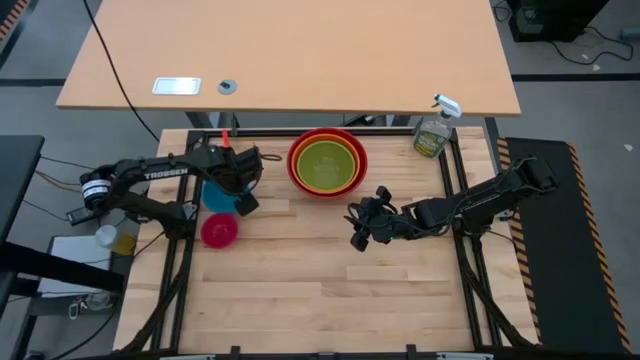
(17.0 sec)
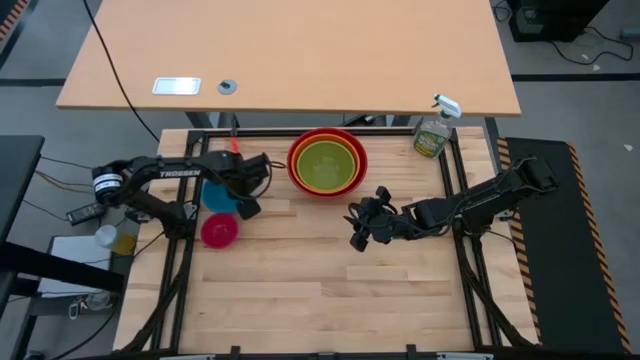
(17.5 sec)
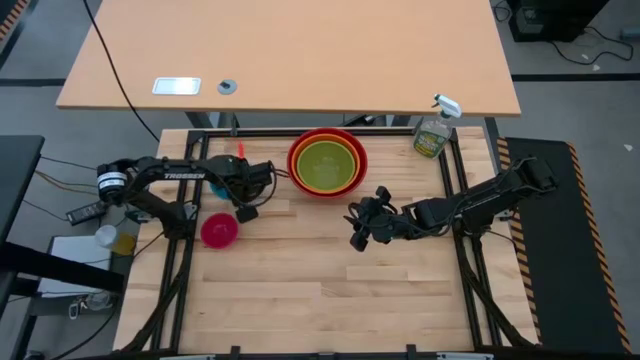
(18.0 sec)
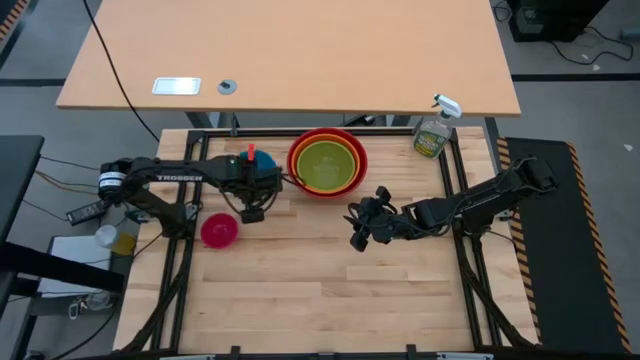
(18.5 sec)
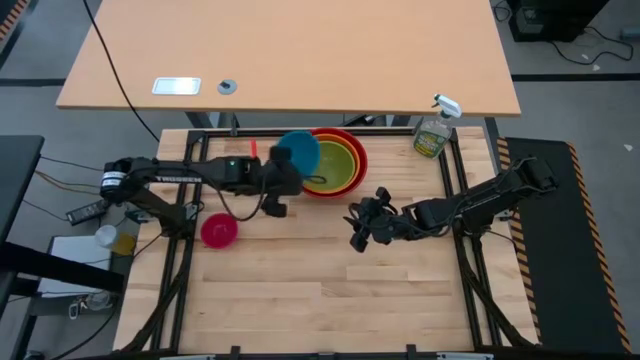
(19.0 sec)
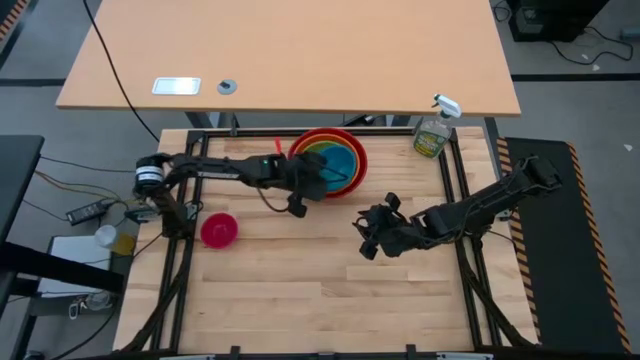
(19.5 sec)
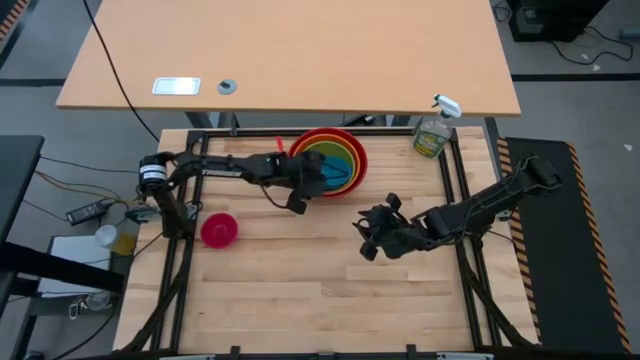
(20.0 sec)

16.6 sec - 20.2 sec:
Stack the blue bowl on top of the green bowl

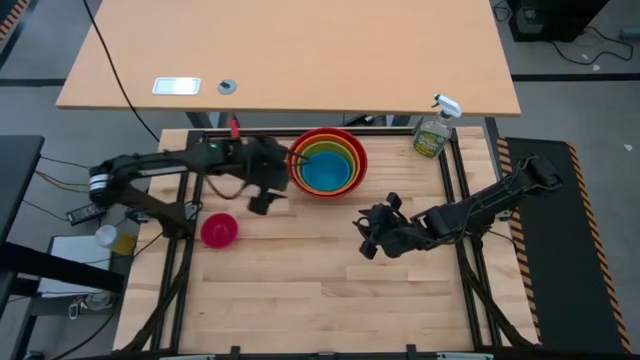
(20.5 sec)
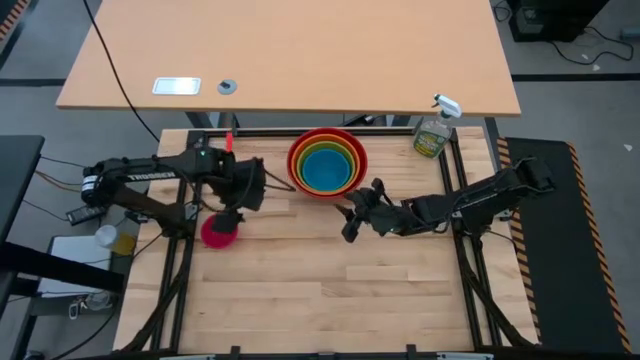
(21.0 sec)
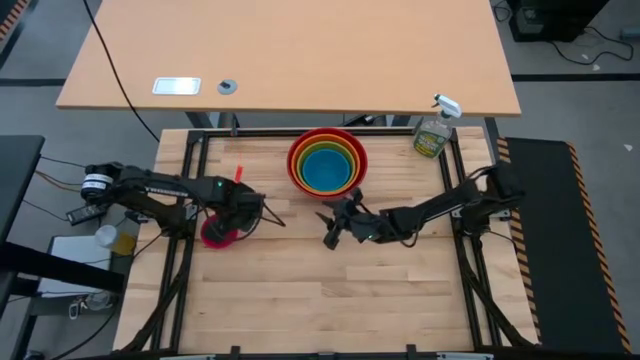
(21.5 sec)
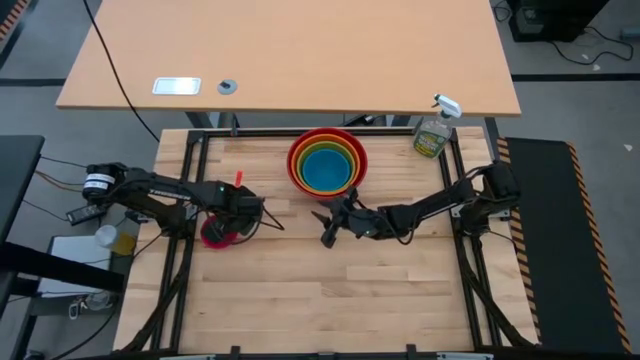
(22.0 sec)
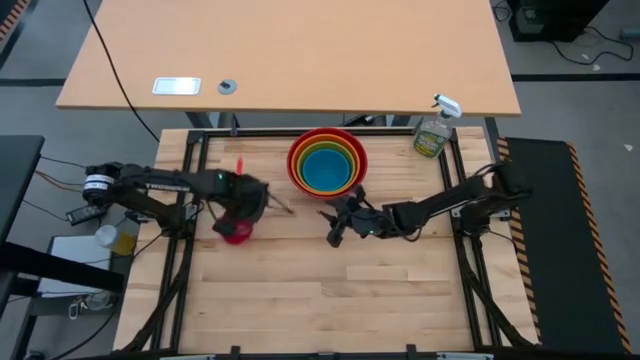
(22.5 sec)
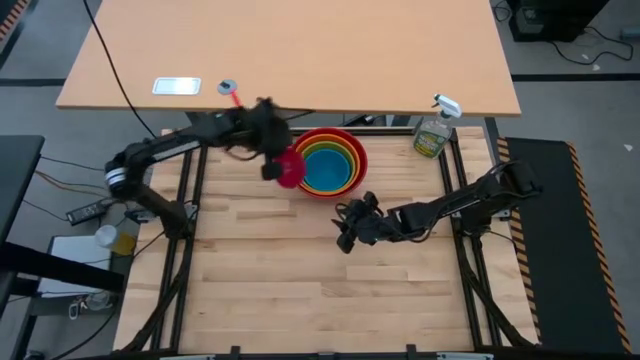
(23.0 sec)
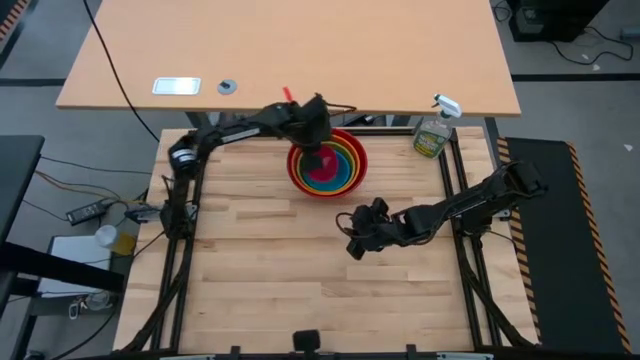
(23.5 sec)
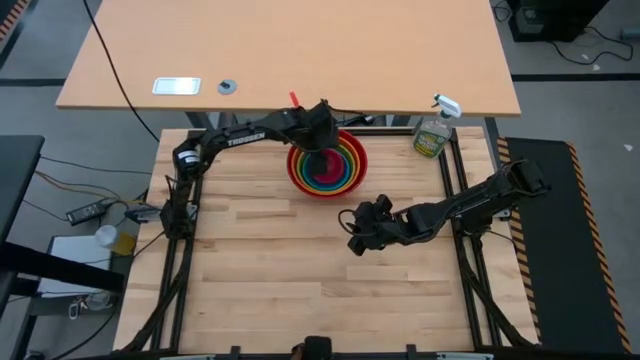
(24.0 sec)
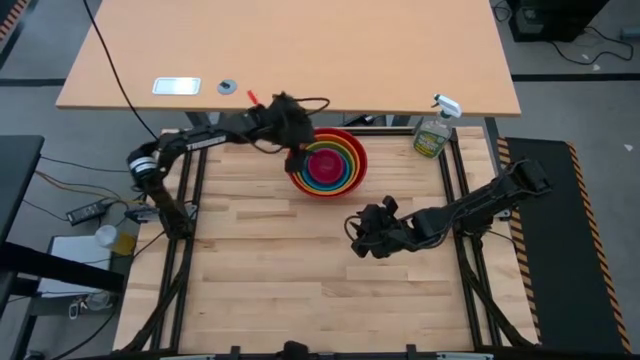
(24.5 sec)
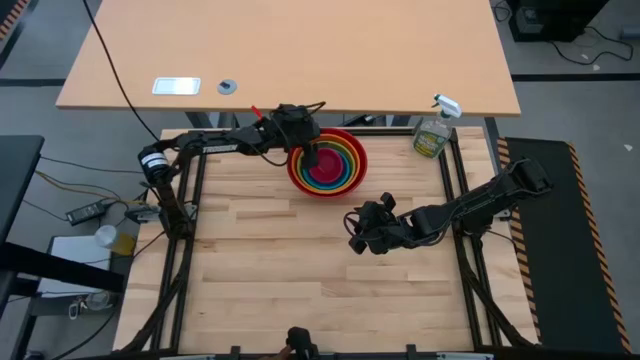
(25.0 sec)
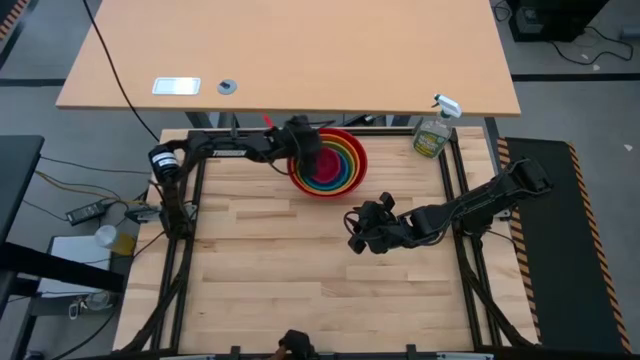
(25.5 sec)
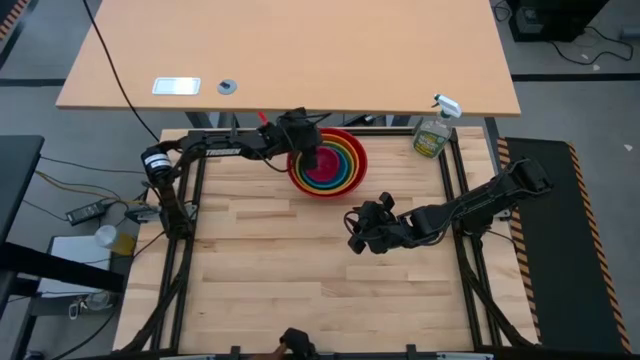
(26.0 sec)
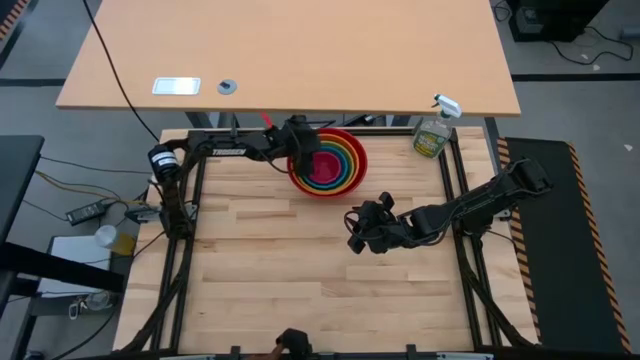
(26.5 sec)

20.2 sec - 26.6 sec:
Stack the pink bowl on top of the blue bowl

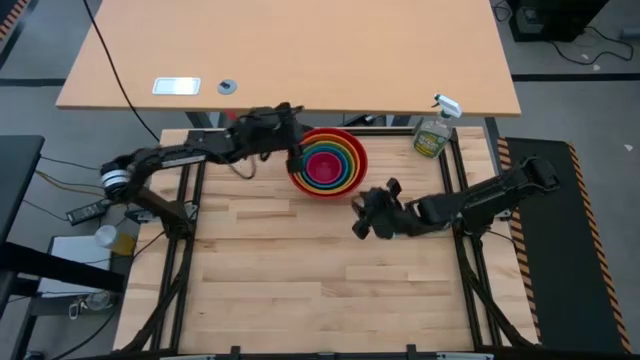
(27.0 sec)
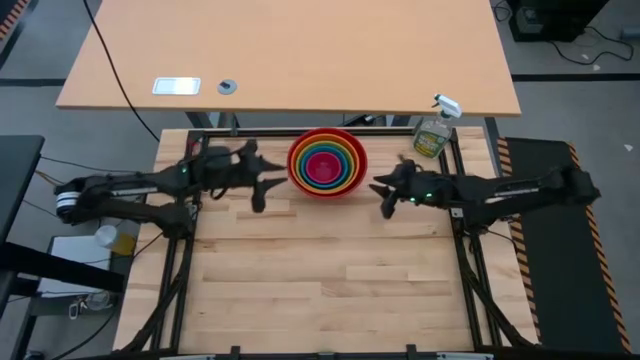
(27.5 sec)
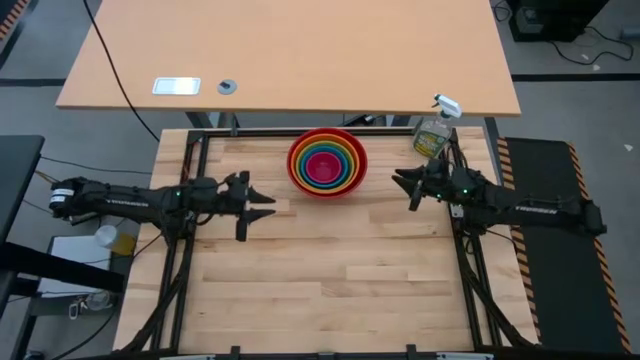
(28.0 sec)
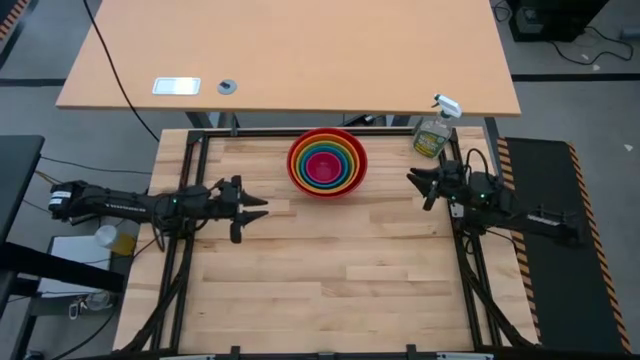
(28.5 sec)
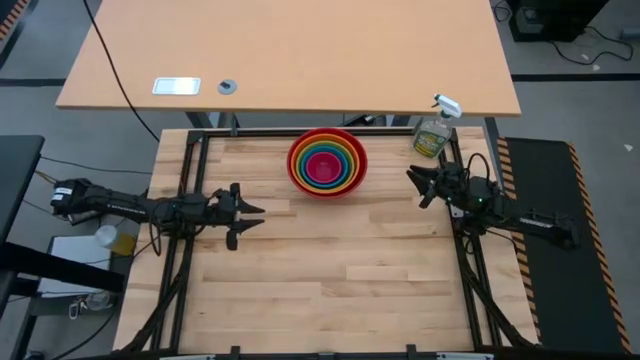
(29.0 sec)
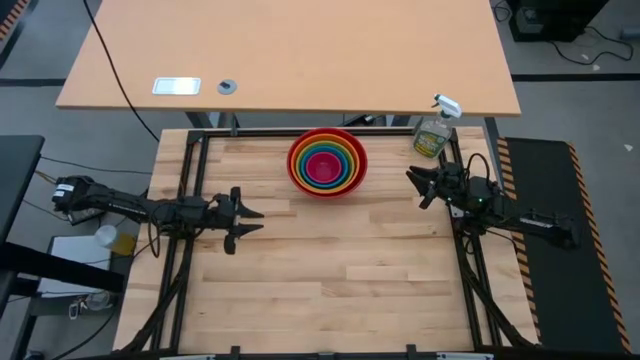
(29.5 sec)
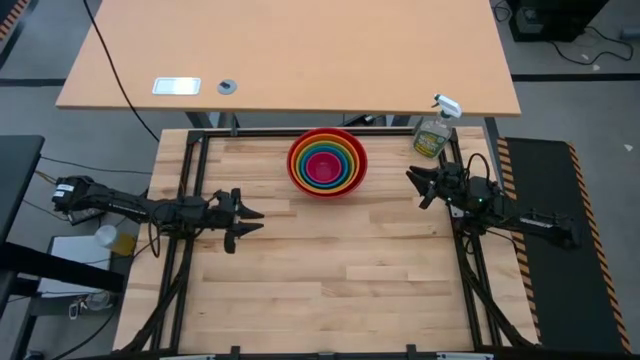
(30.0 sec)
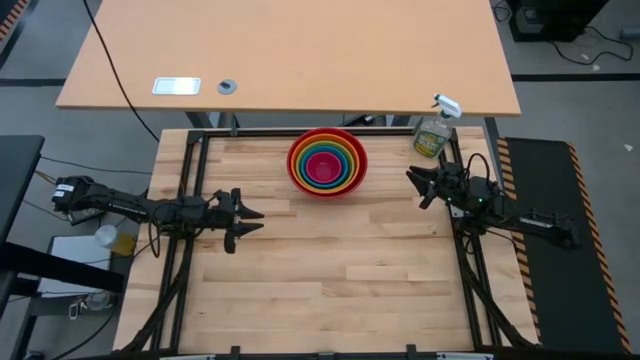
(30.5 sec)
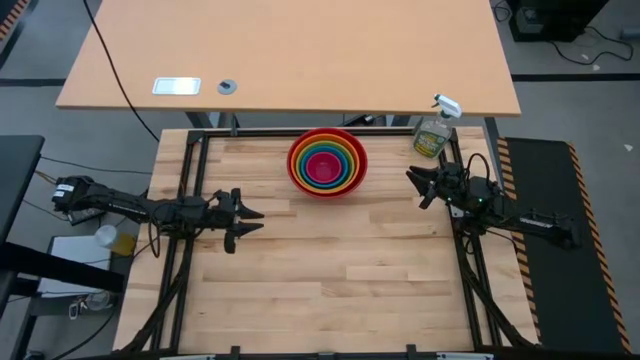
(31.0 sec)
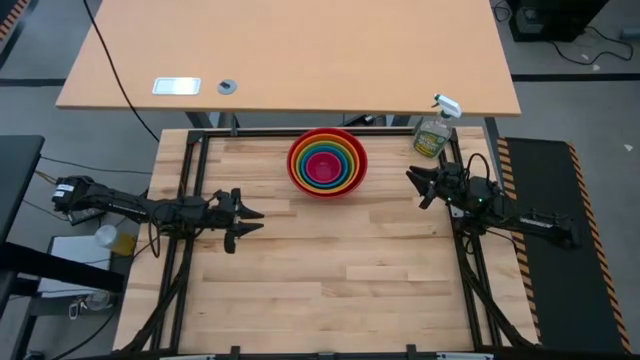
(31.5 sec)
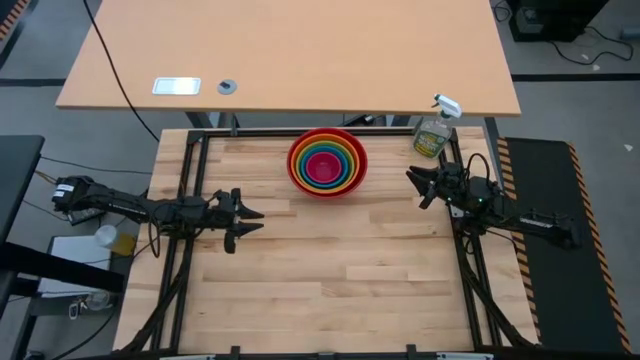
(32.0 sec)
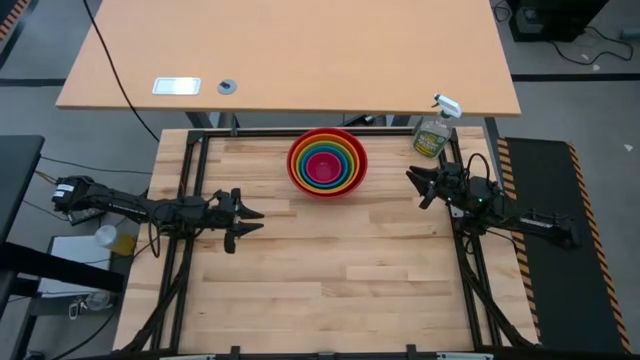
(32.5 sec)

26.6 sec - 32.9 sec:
Return to Home Position

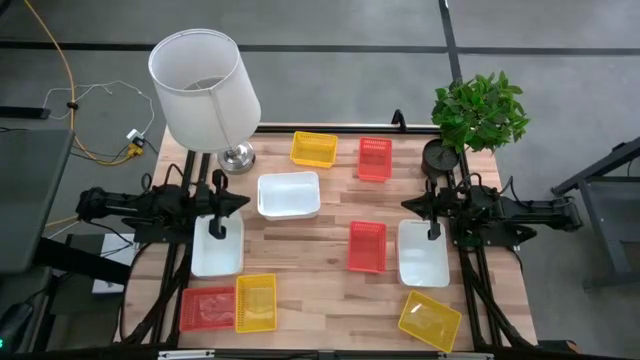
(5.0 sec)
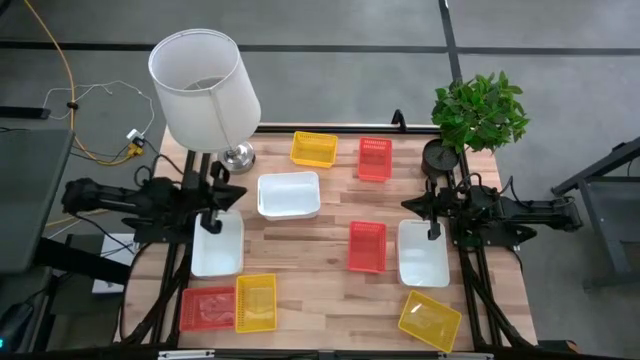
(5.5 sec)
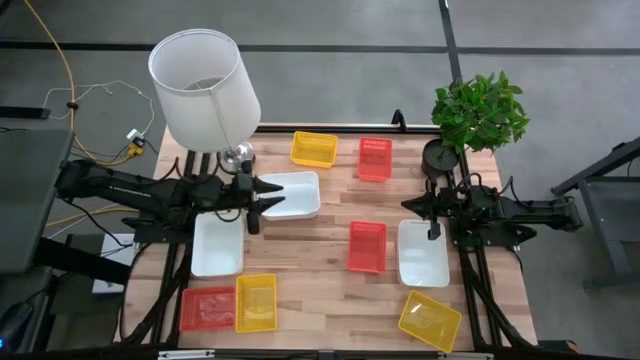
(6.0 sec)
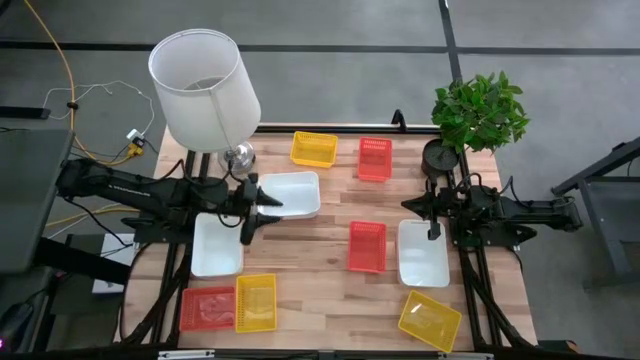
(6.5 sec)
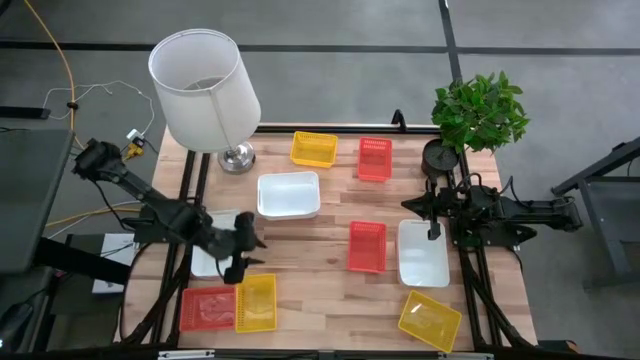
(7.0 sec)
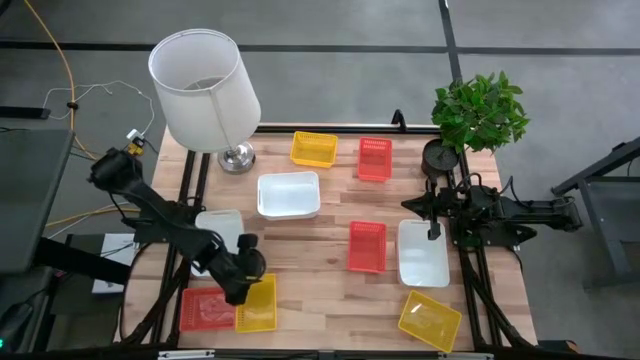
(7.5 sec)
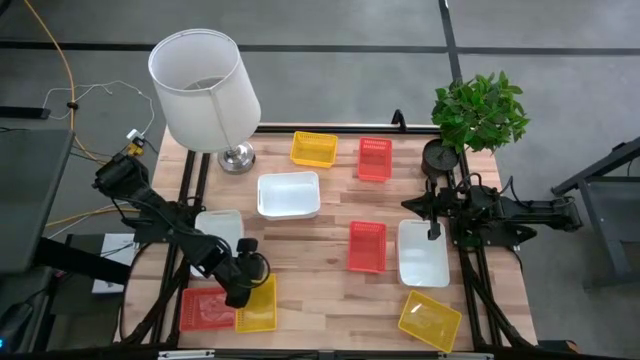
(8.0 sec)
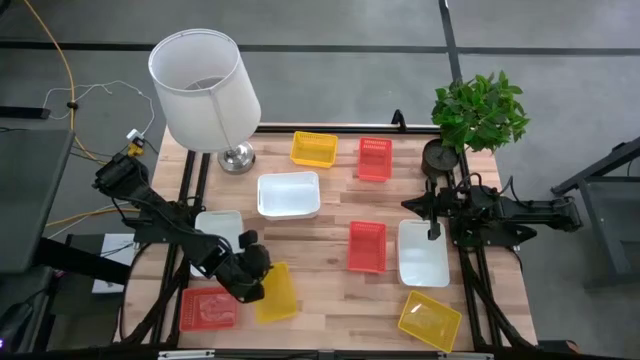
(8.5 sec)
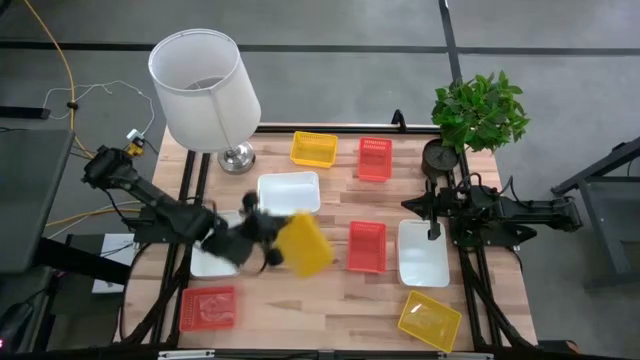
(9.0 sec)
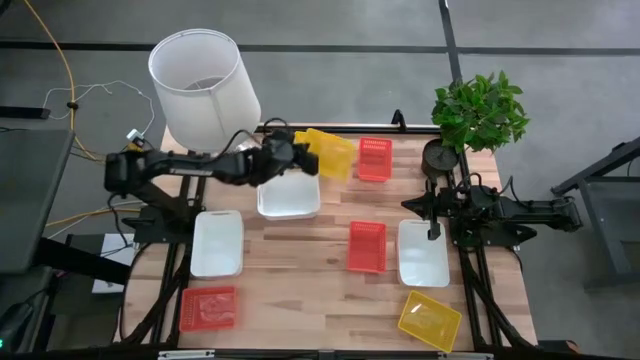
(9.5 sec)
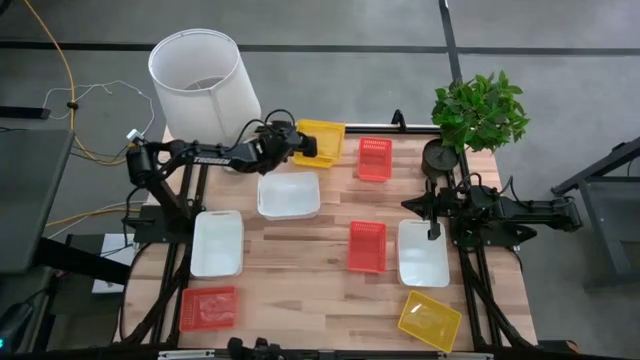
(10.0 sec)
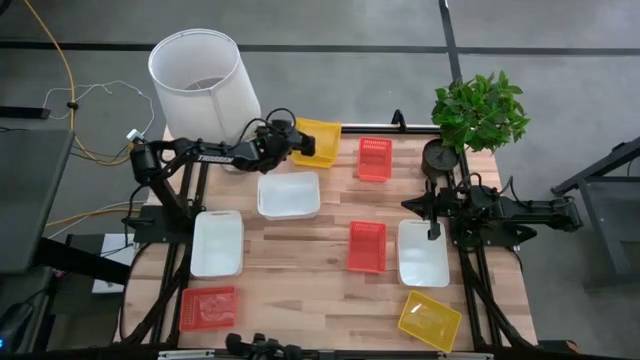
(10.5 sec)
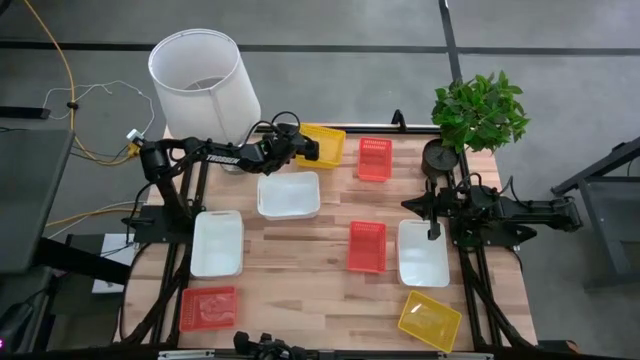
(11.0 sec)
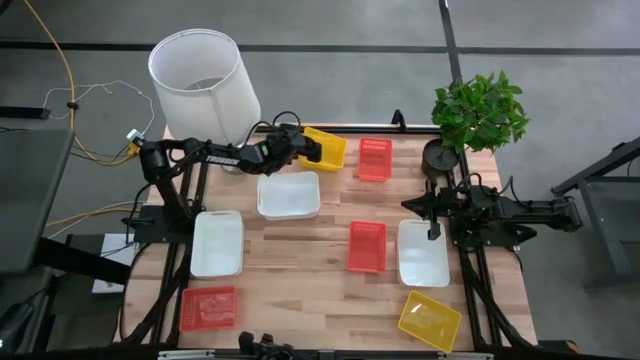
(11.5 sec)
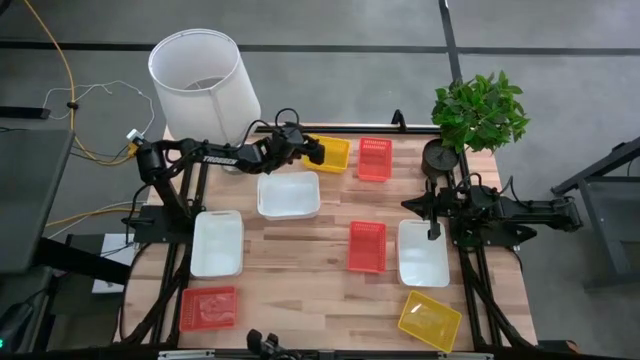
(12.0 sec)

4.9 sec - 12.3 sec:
Stack the bottom left yellow bin on the top left yellow bin
